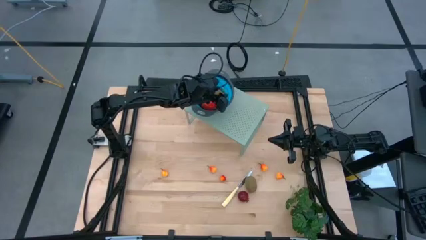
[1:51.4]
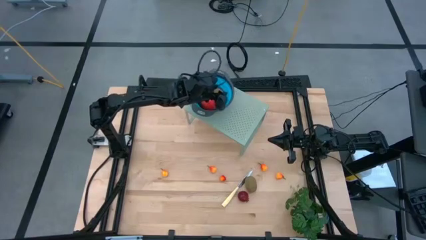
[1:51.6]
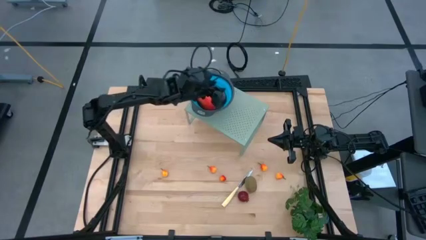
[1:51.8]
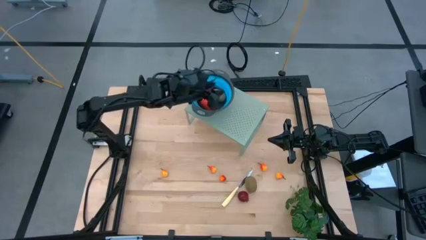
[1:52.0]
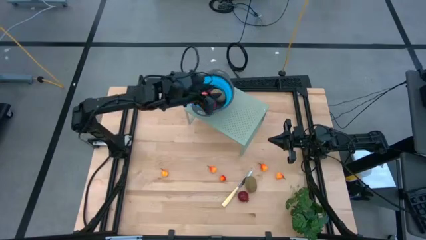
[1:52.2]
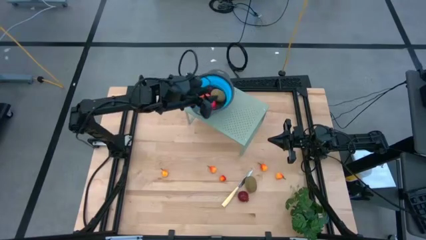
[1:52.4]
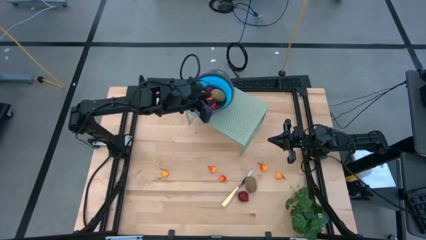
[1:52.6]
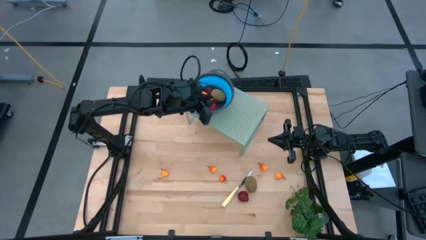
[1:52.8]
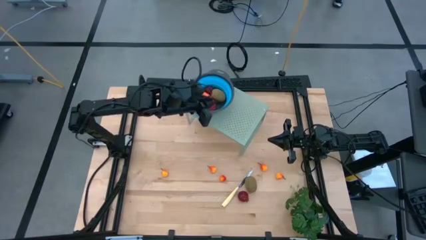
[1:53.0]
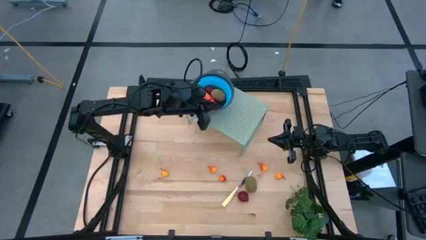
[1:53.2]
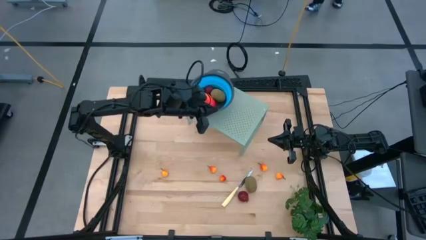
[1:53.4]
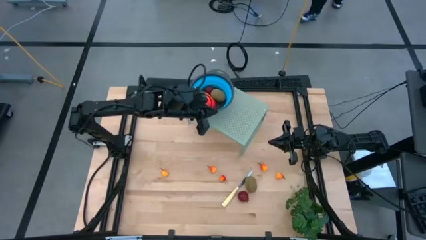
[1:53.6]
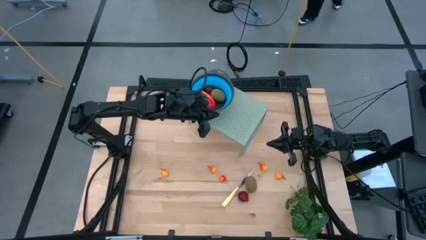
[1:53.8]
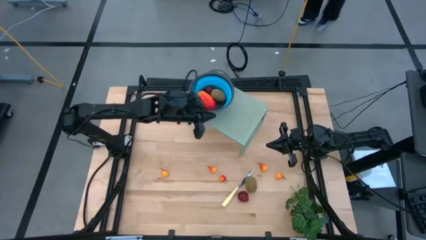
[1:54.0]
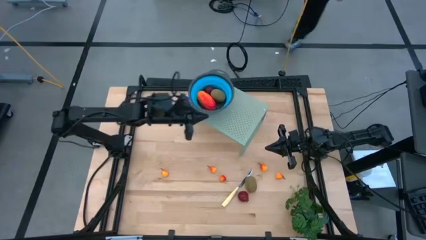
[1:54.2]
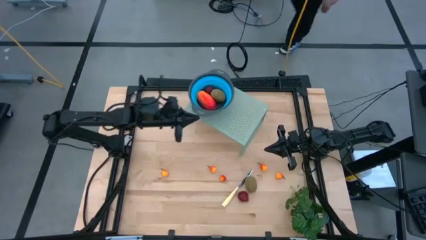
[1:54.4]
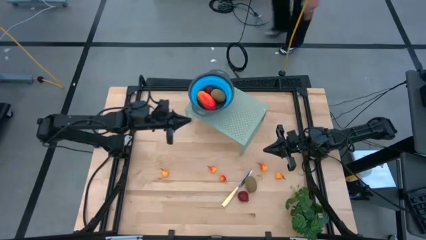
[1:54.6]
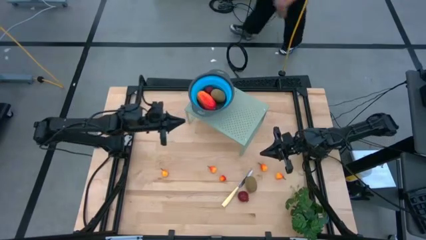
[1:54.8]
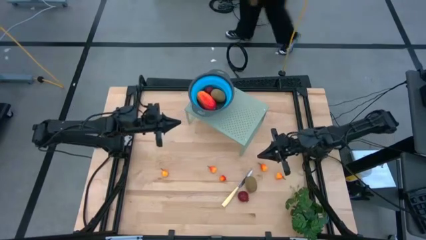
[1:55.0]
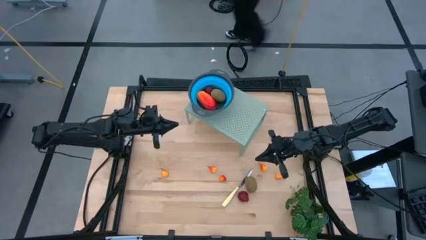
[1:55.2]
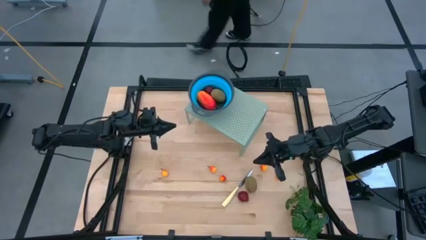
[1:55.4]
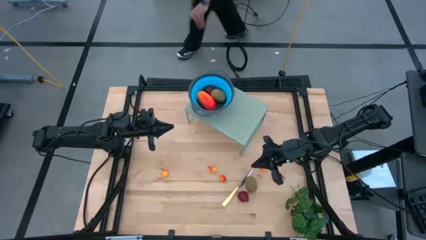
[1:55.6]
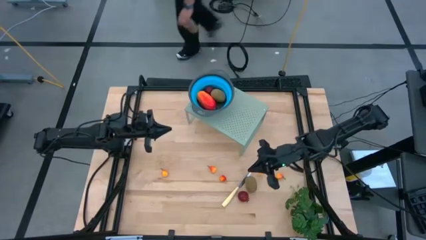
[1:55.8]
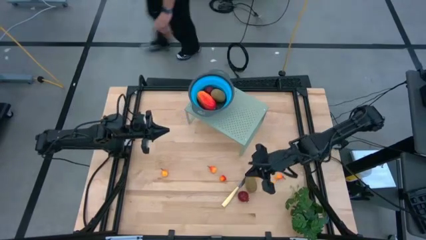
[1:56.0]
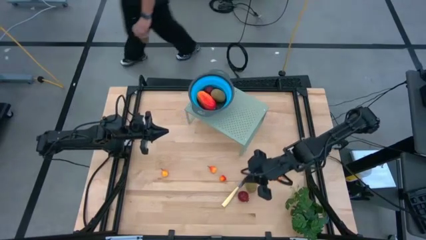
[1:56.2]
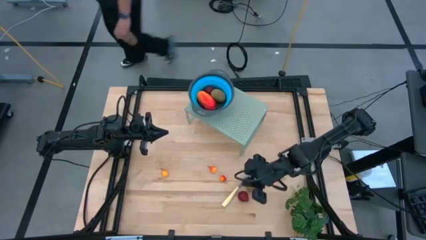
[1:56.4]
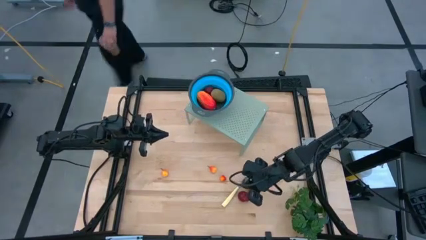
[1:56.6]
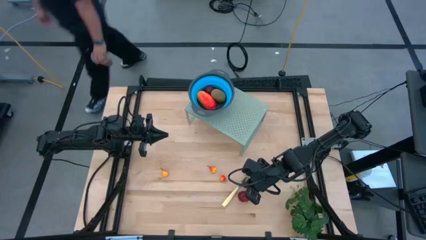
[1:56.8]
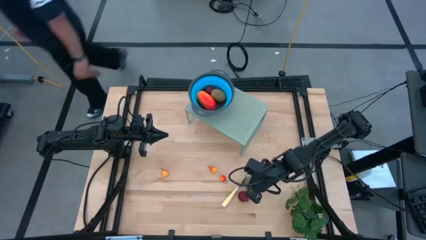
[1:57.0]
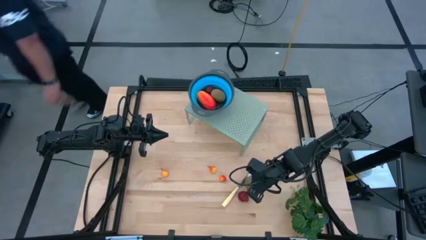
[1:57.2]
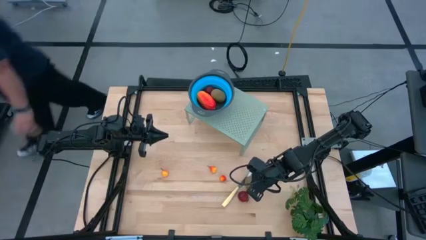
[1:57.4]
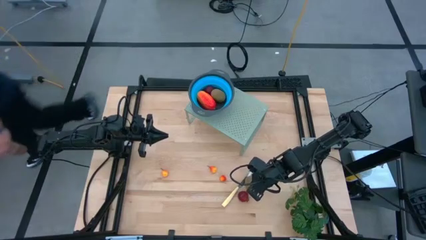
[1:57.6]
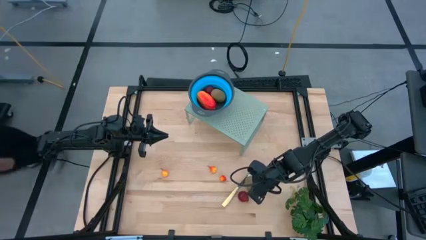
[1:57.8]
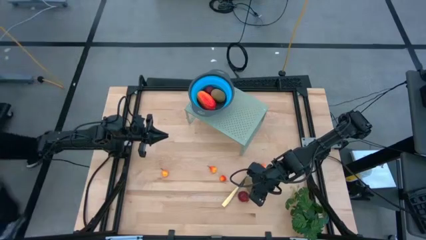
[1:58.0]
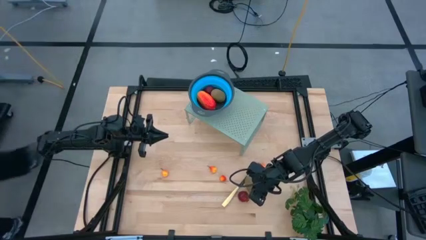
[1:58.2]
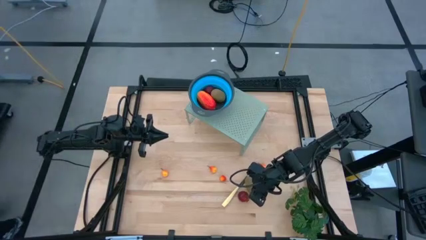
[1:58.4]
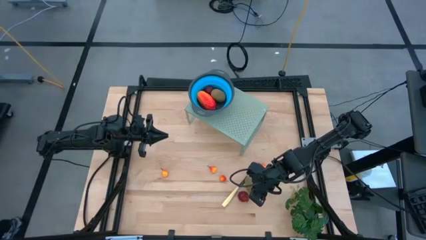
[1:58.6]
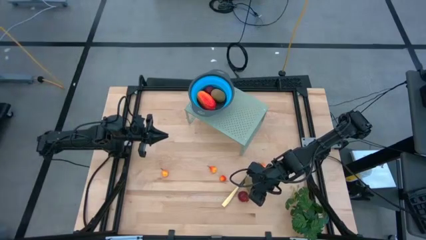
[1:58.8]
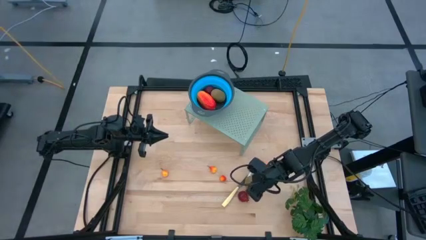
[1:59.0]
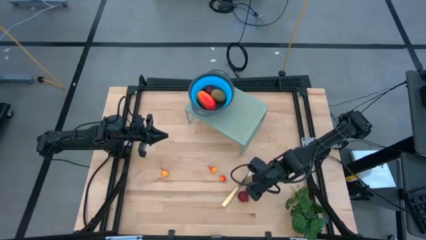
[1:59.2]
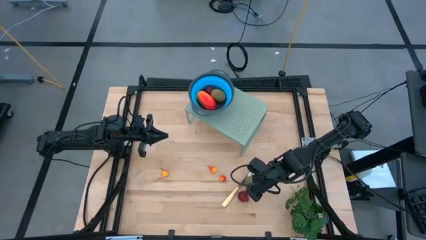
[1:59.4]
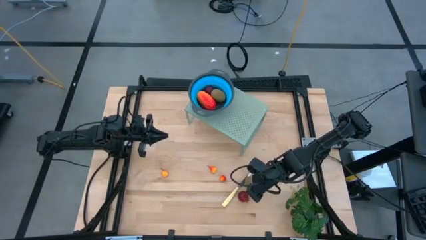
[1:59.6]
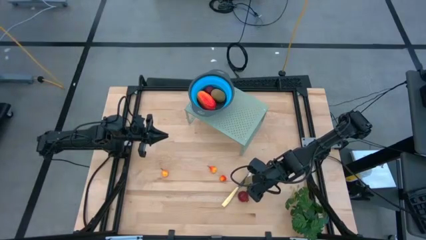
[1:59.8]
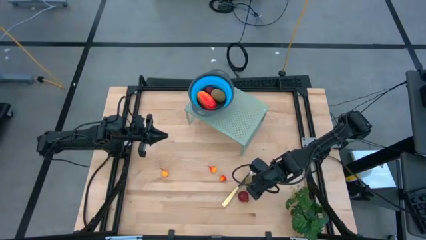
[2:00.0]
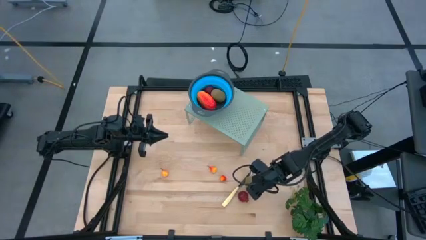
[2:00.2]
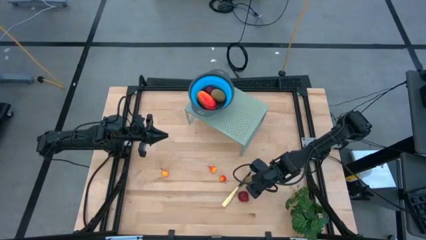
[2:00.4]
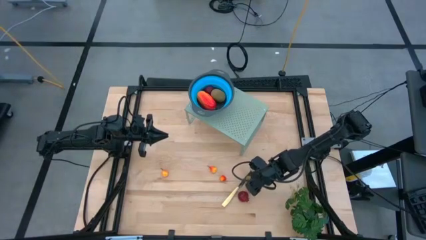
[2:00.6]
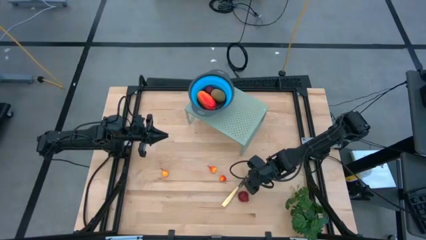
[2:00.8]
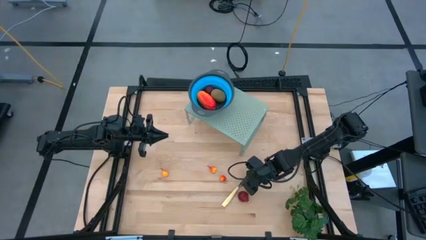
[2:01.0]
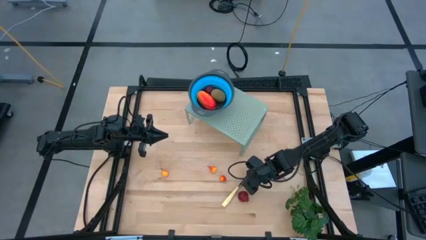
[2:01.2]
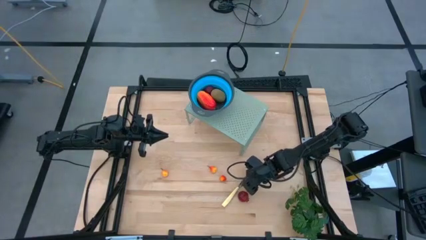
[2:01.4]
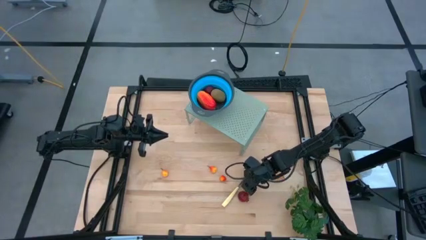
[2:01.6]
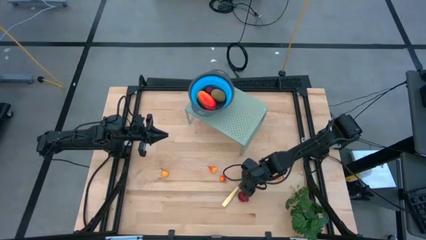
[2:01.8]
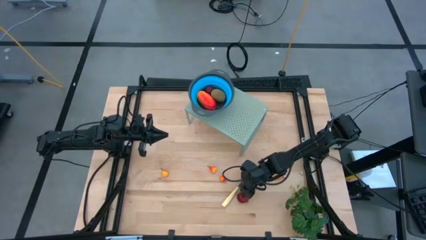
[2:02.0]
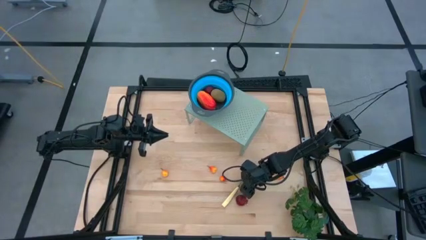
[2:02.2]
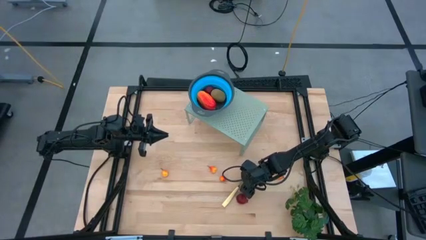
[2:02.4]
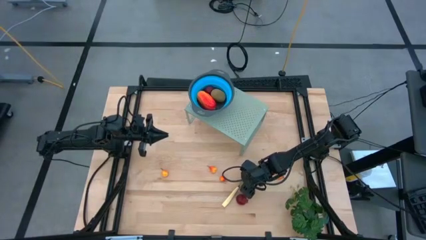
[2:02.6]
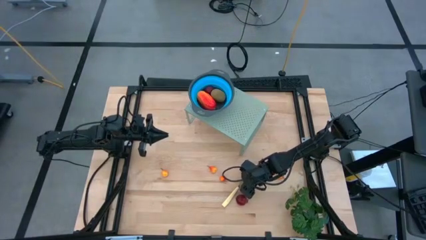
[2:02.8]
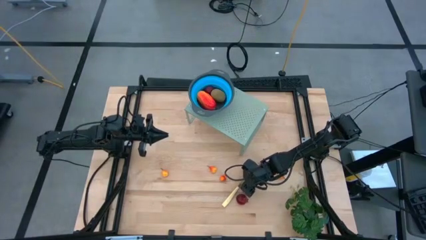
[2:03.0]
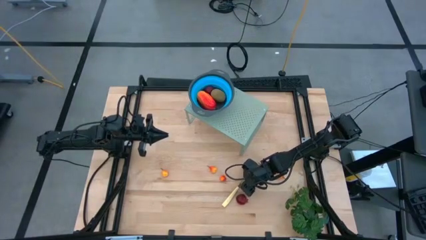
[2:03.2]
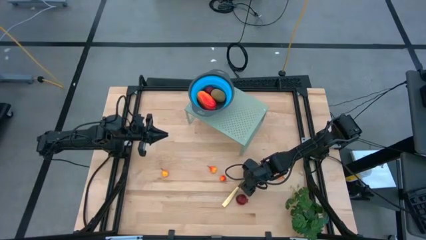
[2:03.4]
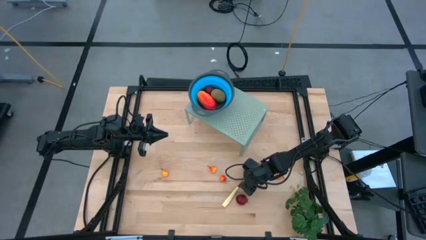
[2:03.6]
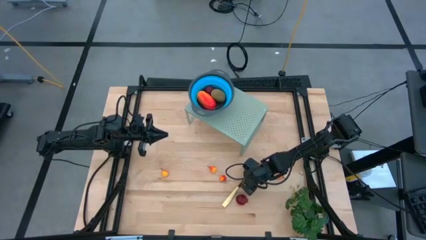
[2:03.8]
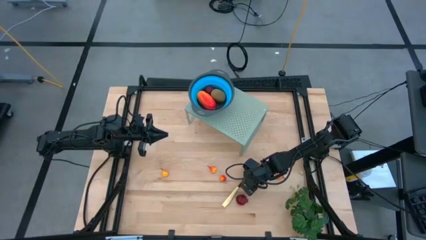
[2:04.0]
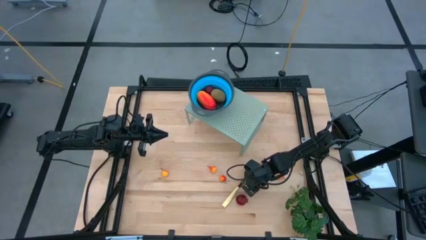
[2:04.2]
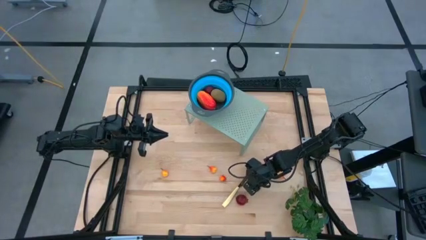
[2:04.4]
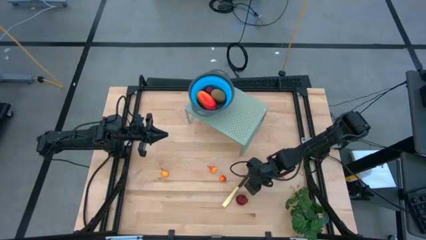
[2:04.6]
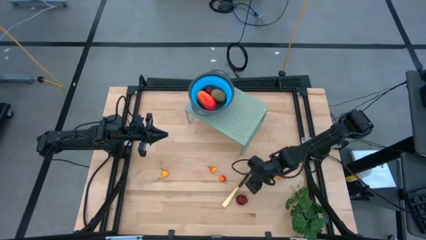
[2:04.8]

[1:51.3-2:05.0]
Task: Pick & Place Fruit
Put the kiwi into the blue strainer bowl on the shelf
